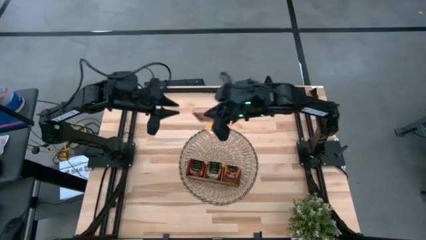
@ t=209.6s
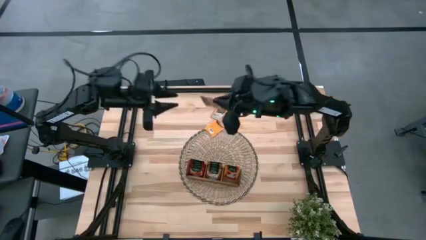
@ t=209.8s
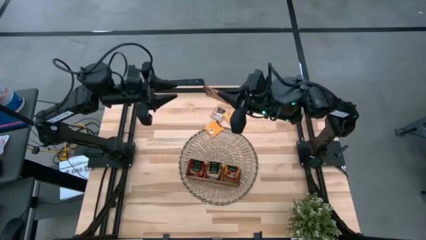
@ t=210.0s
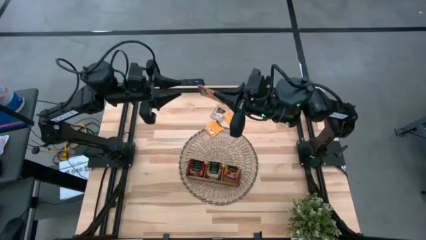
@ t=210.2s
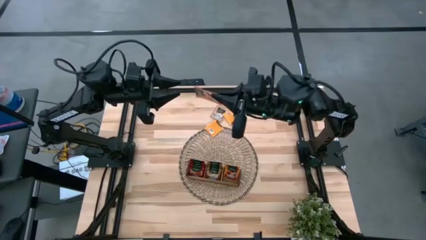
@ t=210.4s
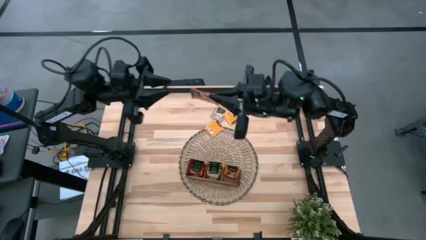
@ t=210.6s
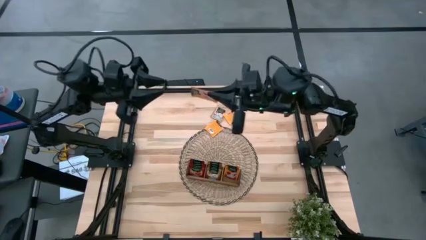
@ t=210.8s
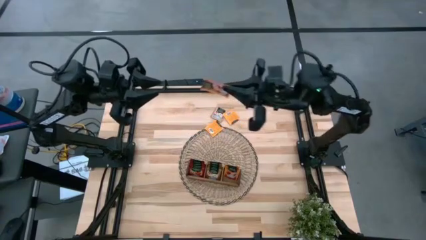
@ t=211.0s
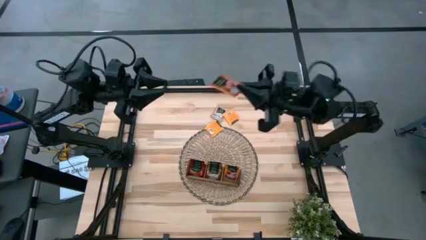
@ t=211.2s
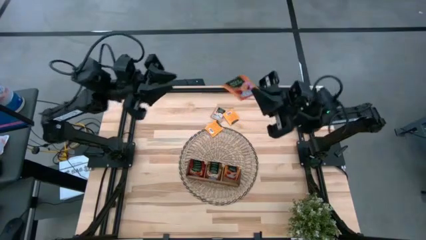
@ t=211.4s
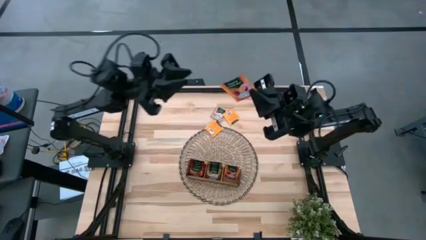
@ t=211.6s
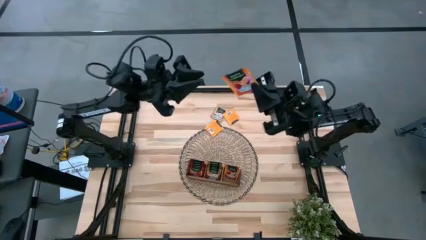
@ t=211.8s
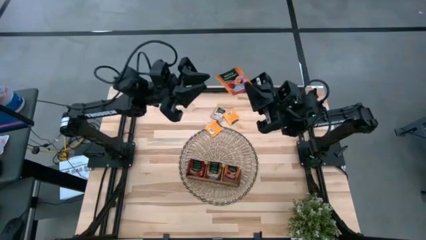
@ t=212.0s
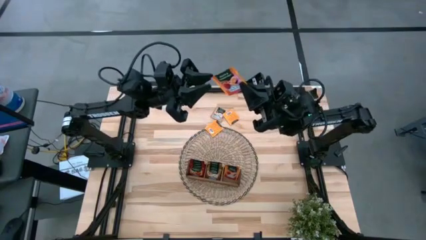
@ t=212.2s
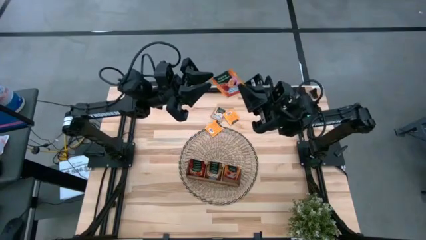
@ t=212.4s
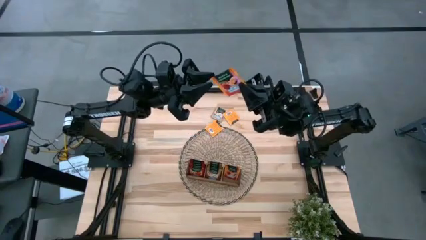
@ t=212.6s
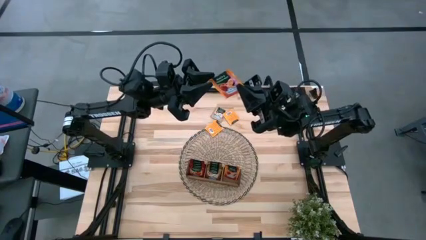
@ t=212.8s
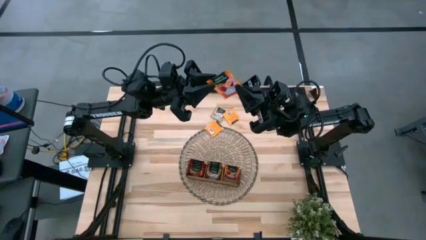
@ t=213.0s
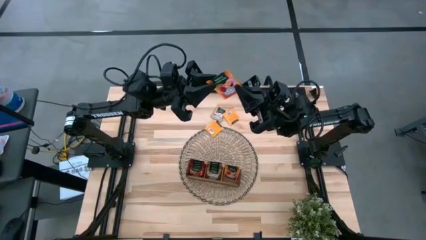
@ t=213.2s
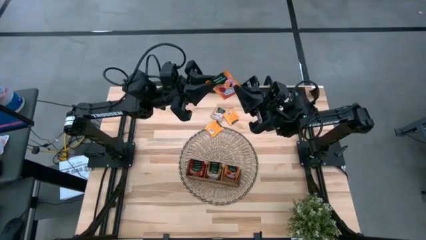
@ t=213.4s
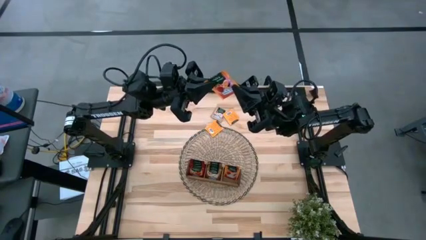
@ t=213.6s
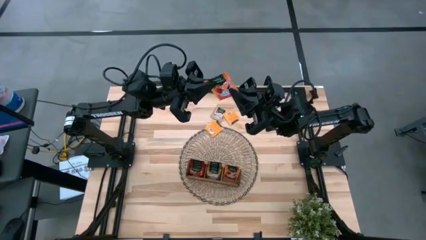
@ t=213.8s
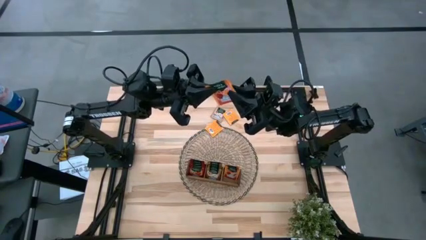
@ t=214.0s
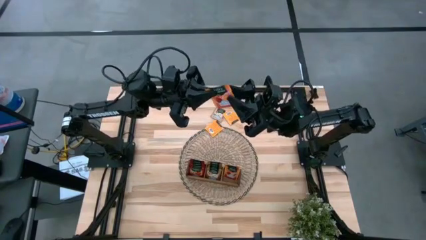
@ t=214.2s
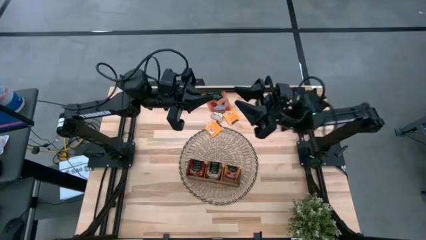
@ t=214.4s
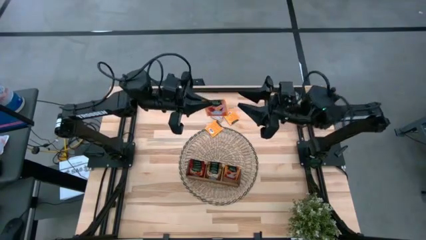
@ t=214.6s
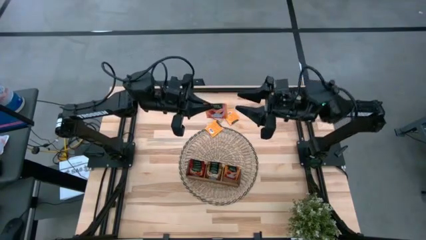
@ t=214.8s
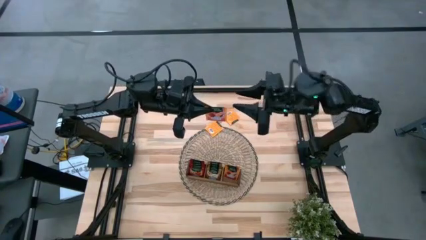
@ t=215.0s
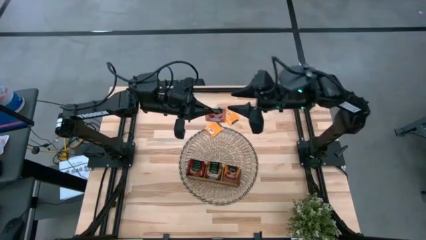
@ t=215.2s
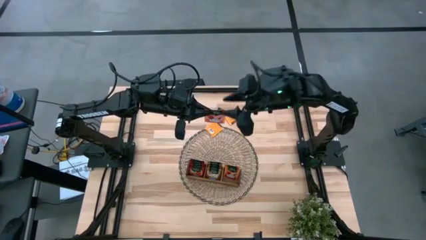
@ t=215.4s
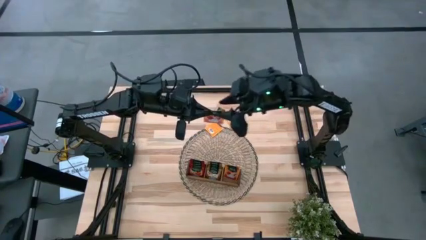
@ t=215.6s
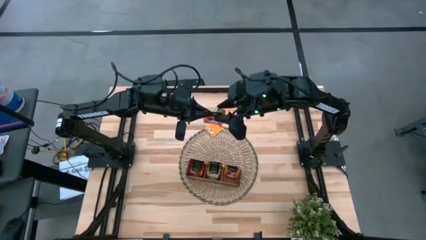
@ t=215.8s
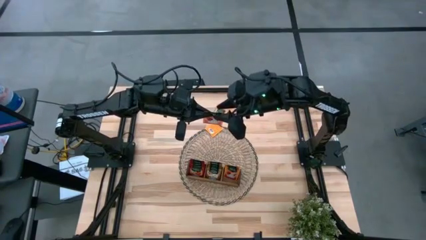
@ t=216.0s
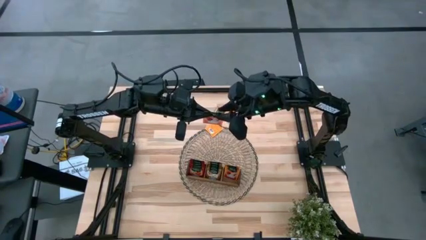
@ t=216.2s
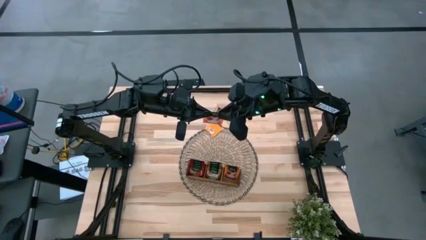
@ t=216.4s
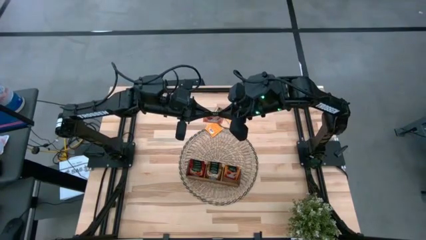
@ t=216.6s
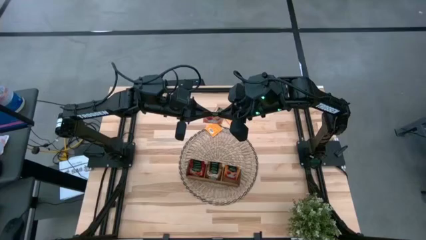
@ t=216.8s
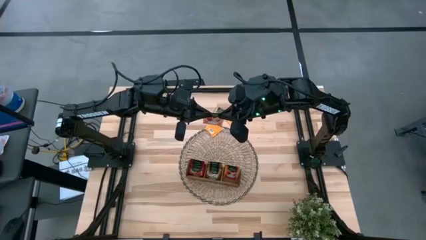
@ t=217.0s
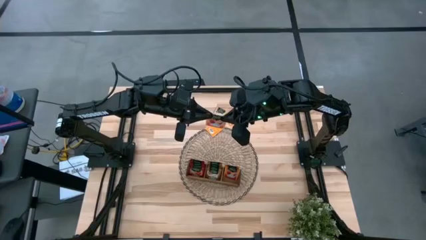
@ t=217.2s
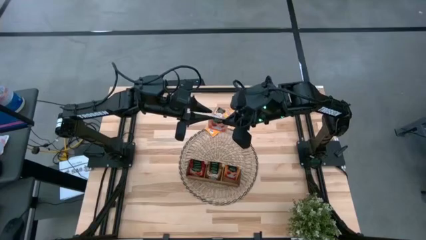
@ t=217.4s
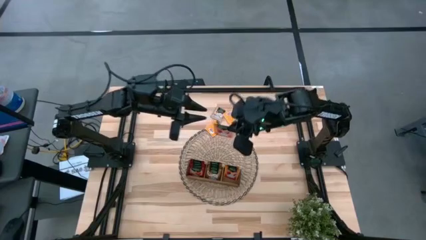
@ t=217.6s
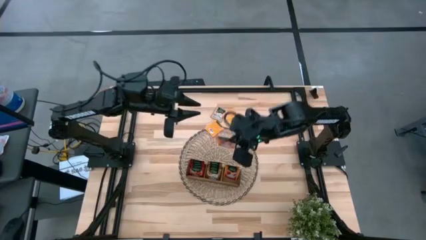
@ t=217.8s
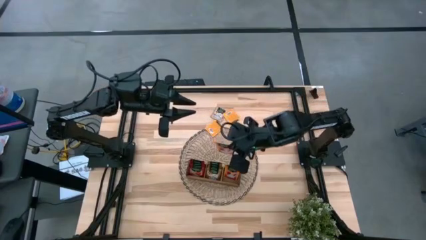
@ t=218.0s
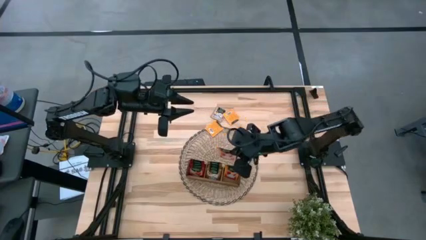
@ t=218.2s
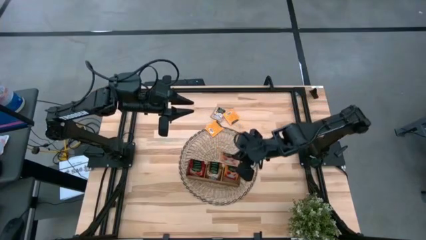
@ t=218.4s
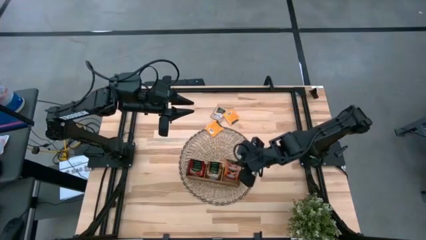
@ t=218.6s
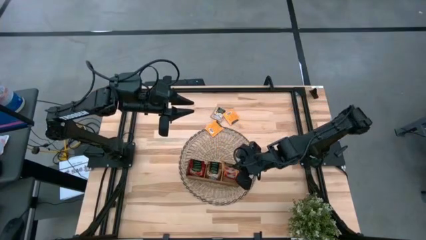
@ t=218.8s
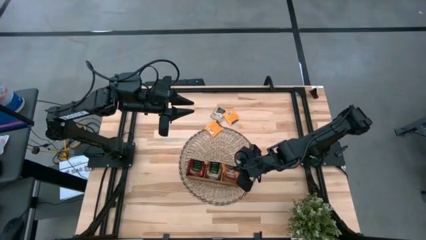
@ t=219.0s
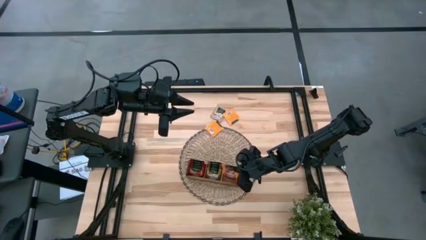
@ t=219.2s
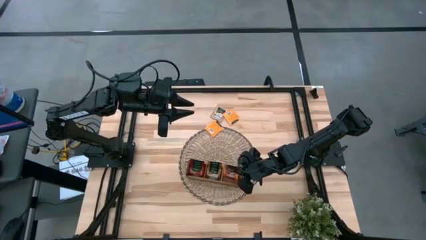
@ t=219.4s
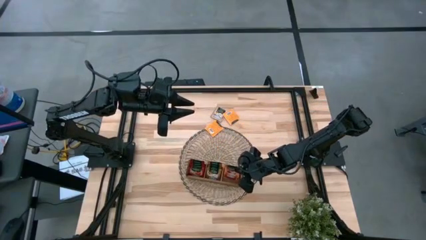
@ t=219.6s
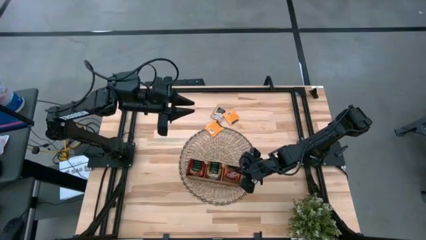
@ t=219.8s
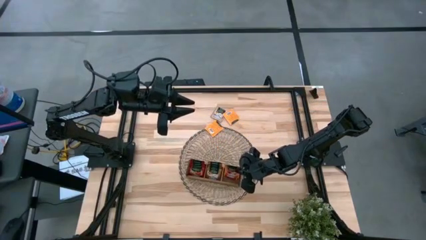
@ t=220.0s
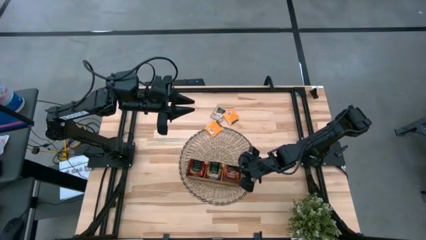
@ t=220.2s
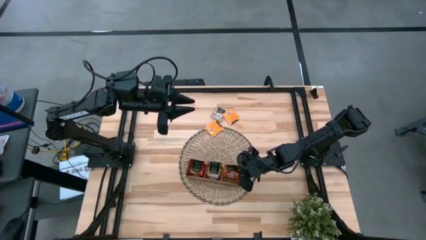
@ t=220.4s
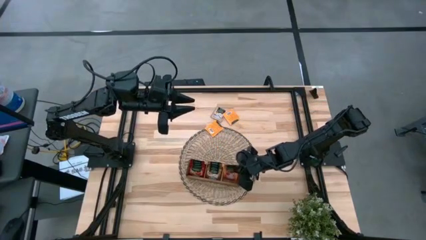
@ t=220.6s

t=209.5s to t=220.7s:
Task: Pick & Place Tea
Put the orange tea bag into the right section of the wooden organizer

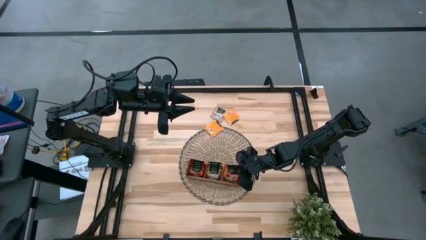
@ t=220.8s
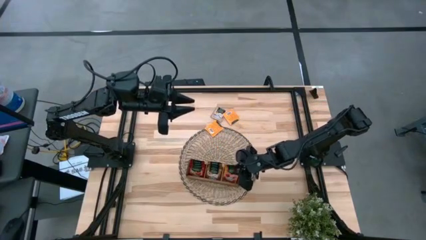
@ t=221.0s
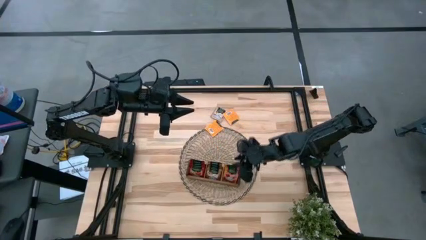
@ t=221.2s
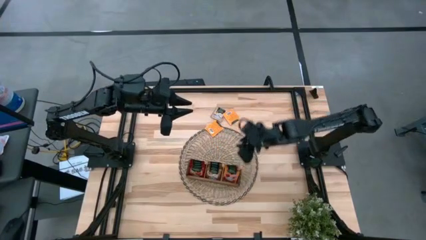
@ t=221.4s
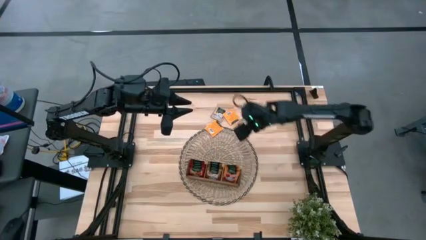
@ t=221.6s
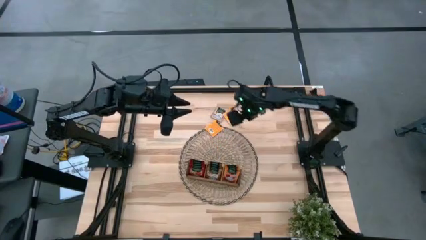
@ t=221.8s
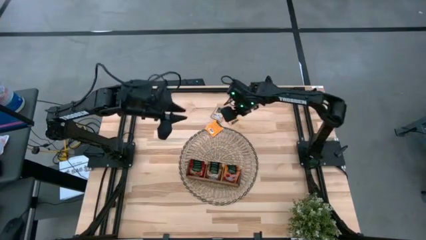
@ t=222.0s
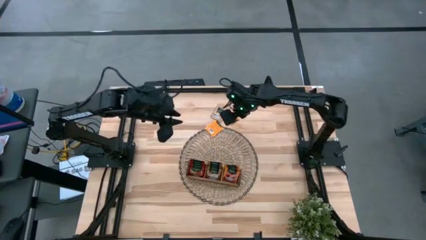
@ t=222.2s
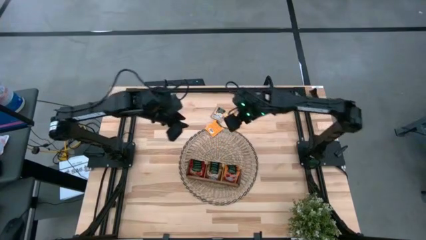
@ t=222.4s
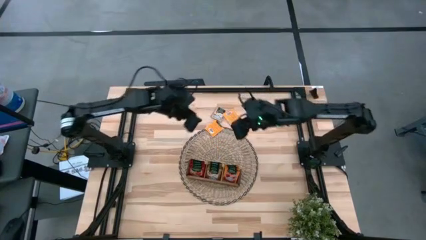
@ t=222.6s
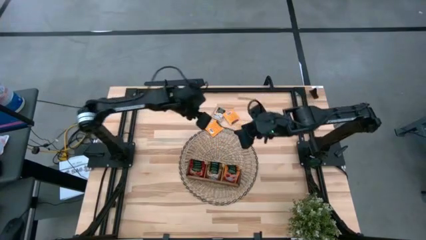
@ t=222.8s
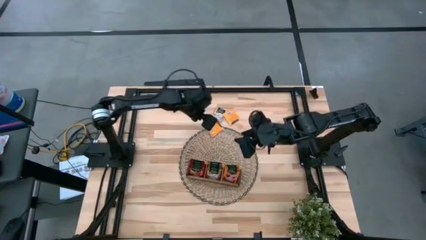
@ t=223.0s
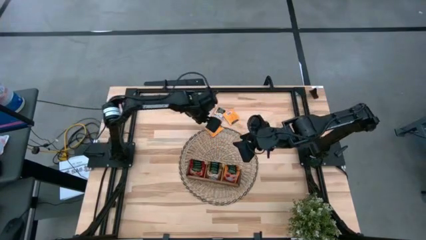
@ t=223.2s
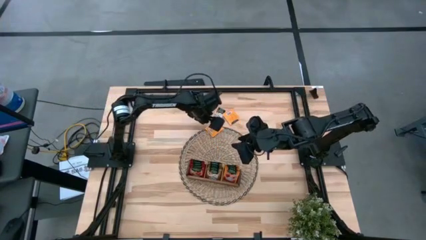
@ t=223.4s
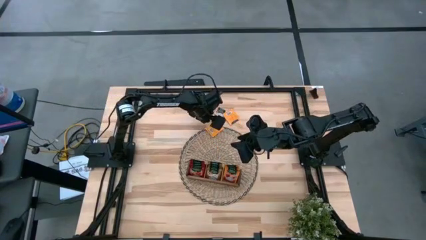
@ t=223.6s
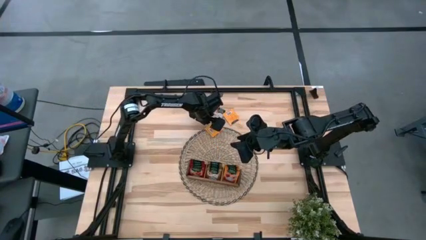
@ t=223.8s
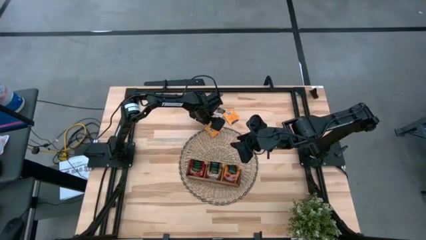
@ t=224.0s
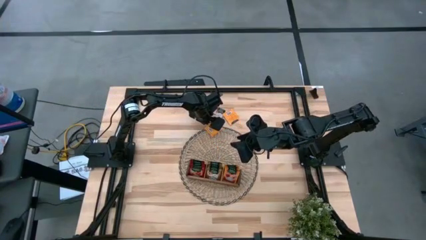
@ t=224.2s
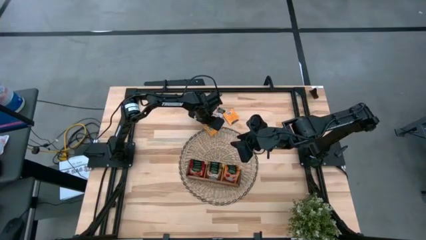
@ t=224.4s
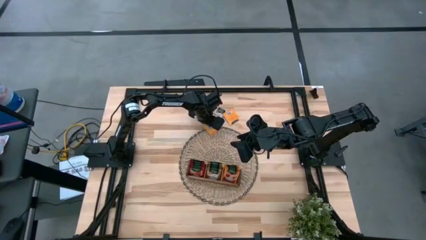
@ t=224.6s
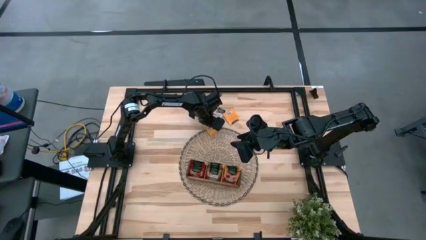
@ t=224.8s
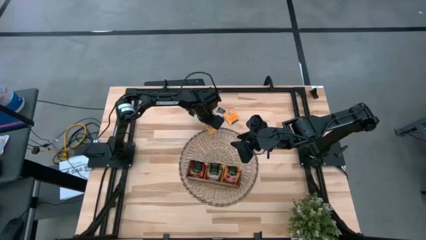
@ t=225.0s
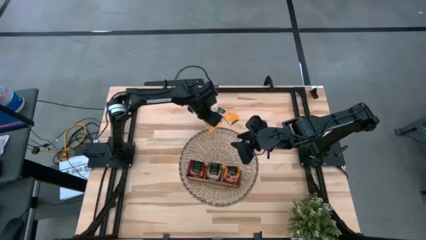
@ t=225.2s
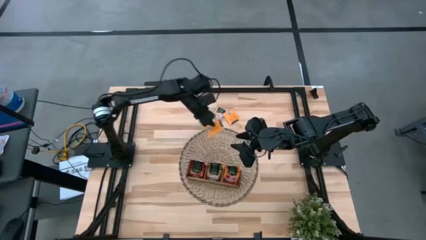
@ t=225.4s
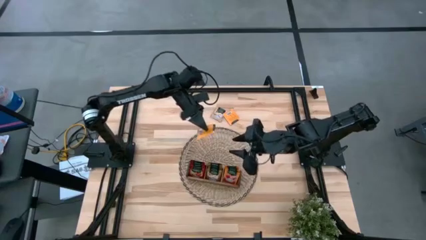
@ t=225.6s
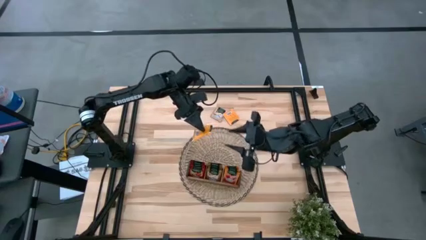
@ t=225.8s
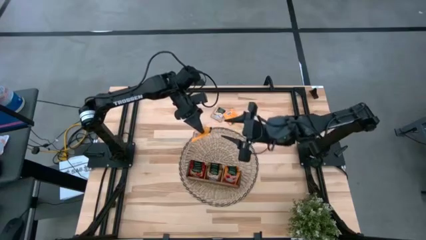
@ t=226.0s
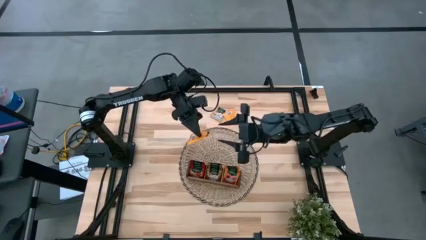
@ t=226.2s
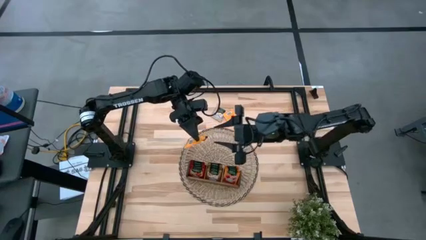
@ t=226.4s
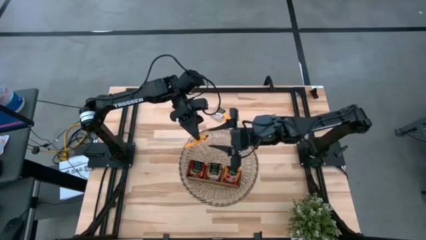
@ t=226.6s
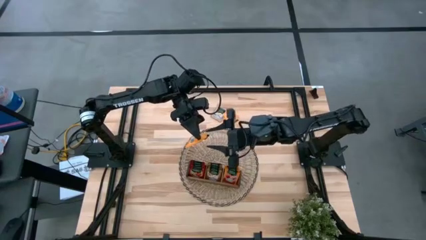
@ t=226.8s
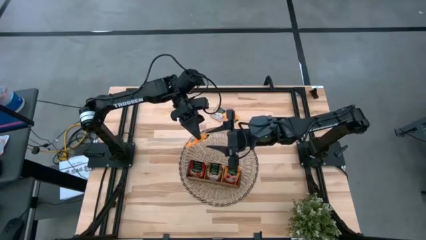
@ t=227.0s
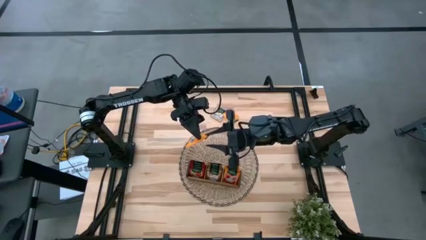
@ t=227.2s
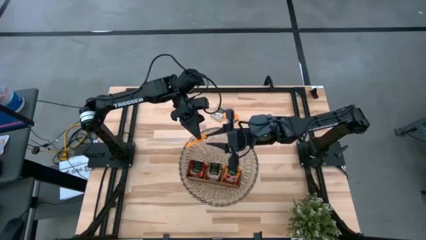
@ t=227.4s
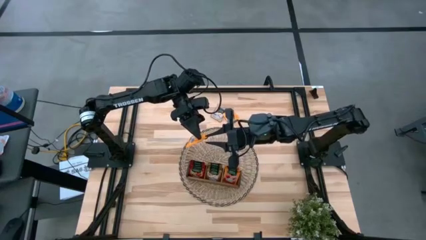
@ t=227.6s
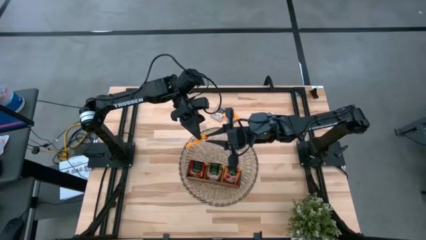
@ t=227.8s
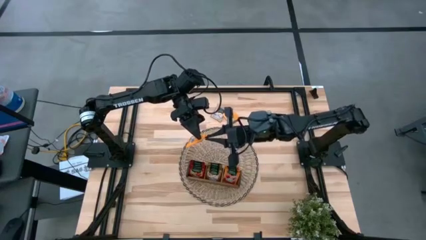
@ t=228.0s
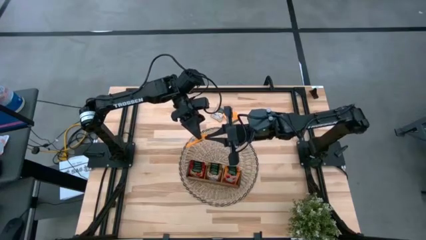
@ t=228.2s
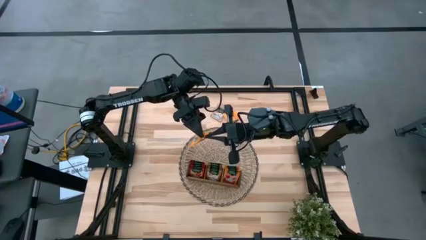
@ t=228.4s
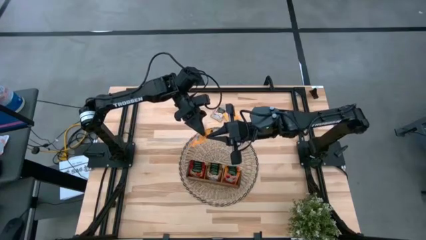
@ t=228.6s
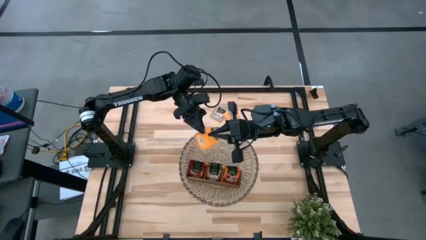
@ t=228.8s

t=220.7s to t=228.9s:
Put the orange tea bag into the right section of the wooden organizer
